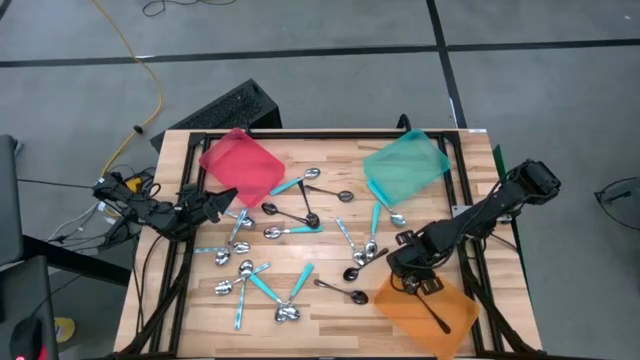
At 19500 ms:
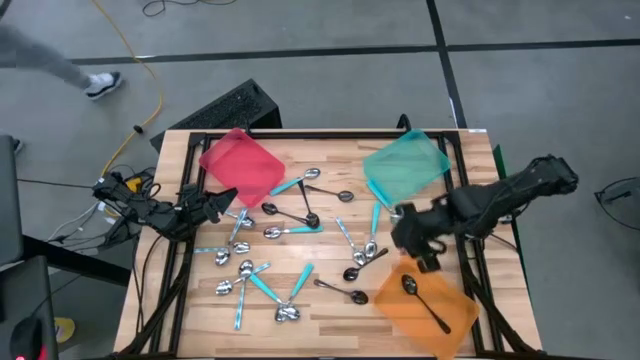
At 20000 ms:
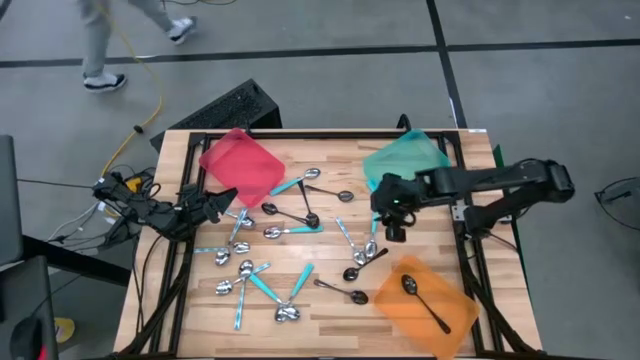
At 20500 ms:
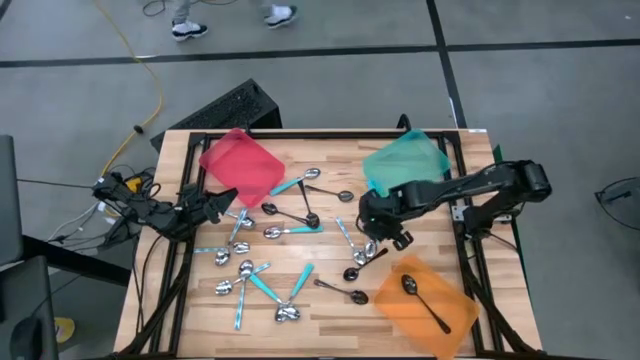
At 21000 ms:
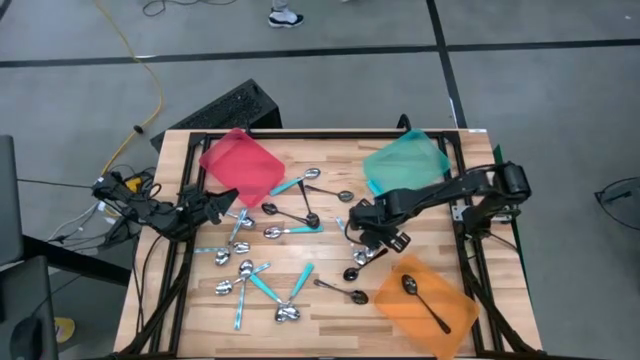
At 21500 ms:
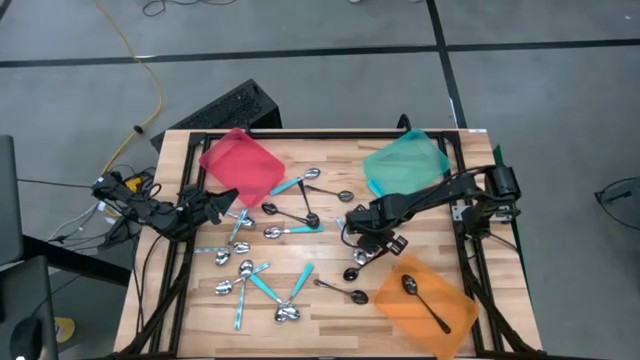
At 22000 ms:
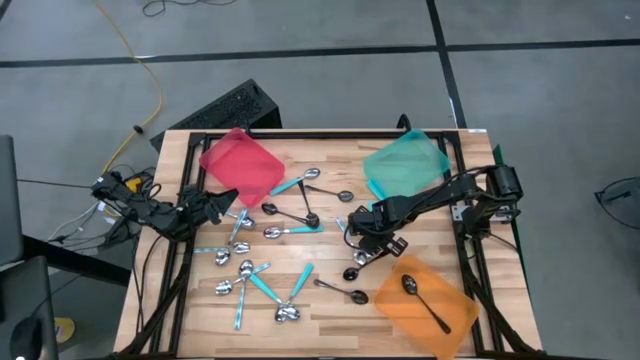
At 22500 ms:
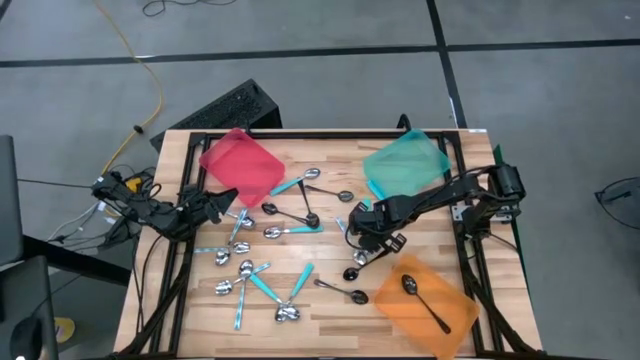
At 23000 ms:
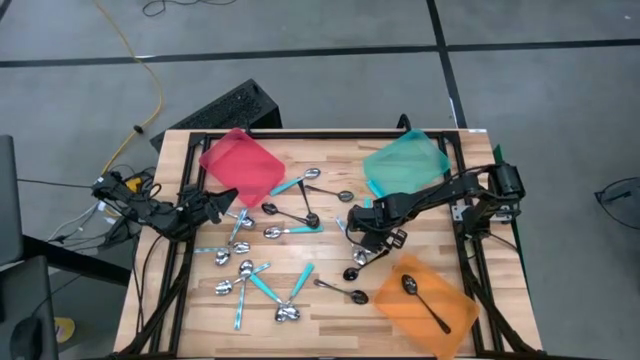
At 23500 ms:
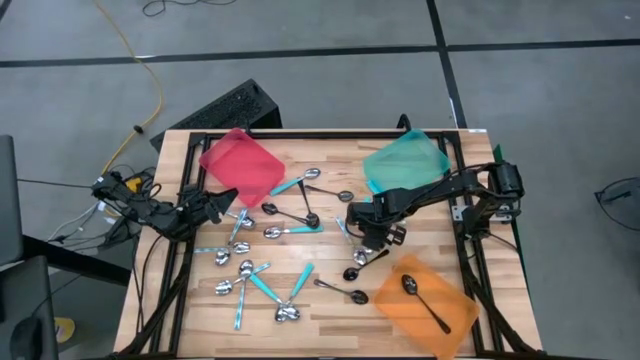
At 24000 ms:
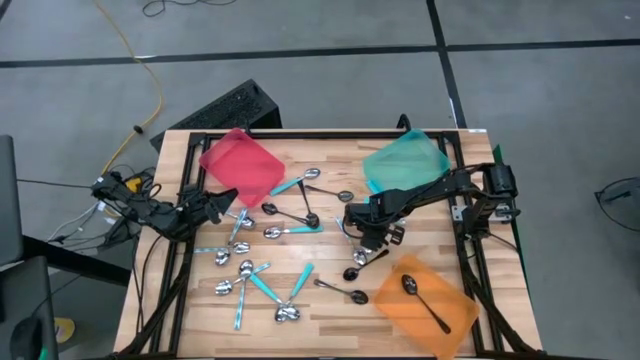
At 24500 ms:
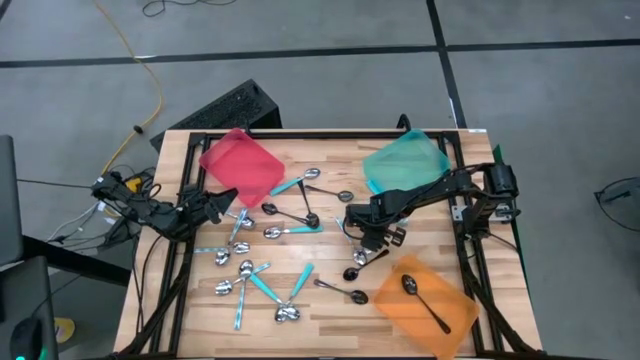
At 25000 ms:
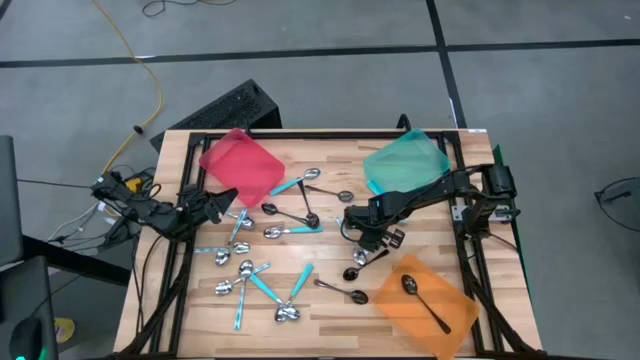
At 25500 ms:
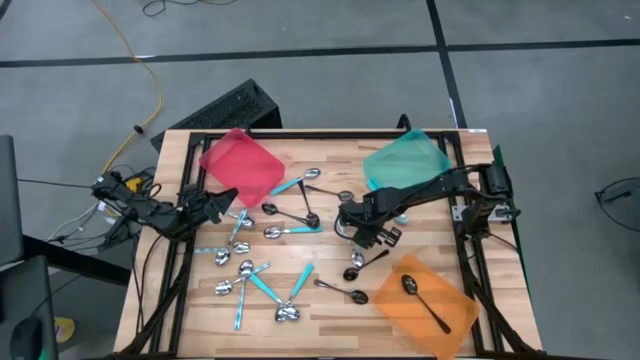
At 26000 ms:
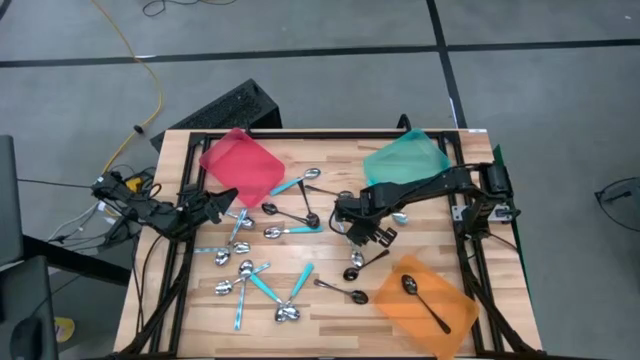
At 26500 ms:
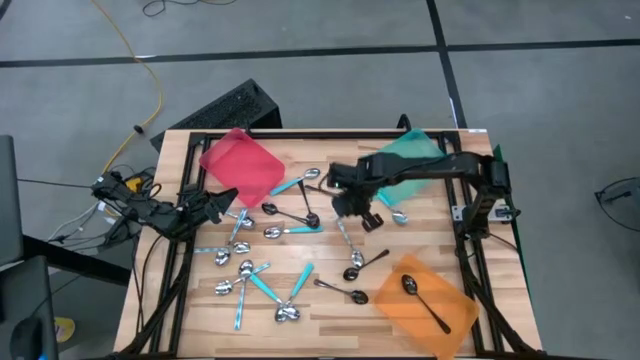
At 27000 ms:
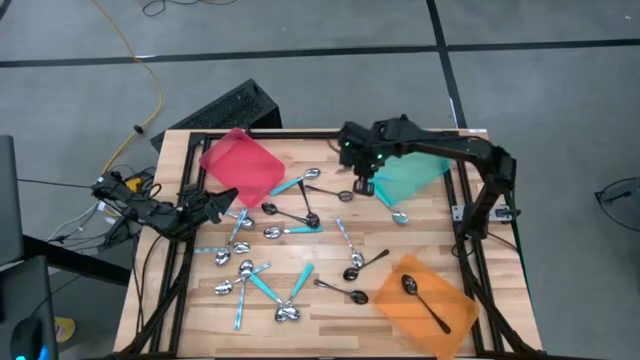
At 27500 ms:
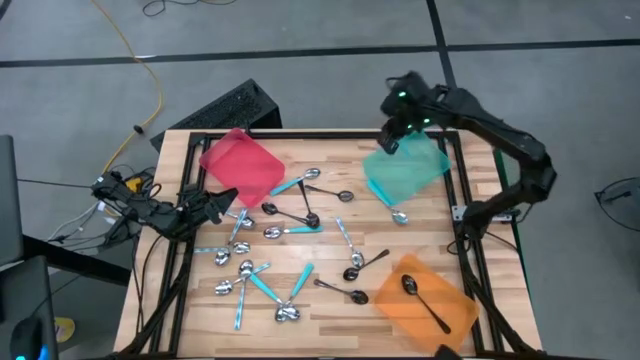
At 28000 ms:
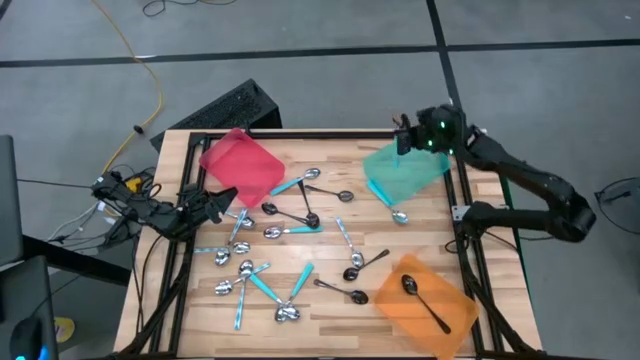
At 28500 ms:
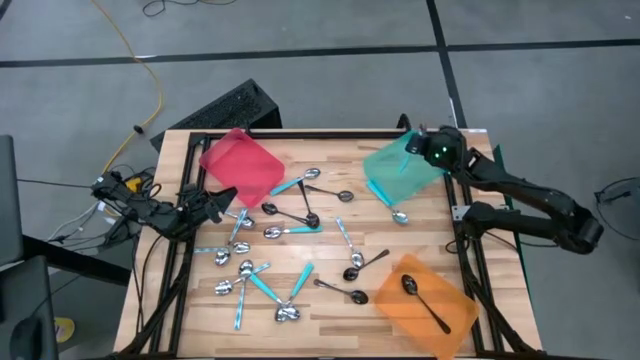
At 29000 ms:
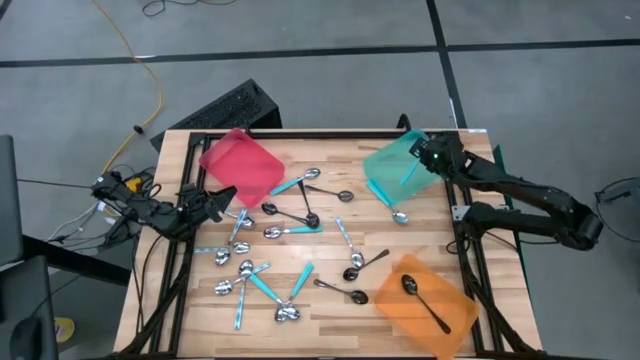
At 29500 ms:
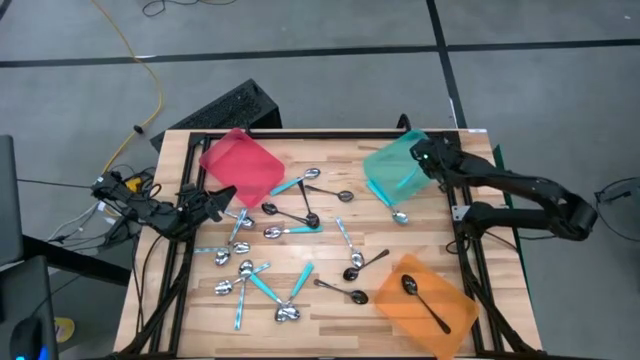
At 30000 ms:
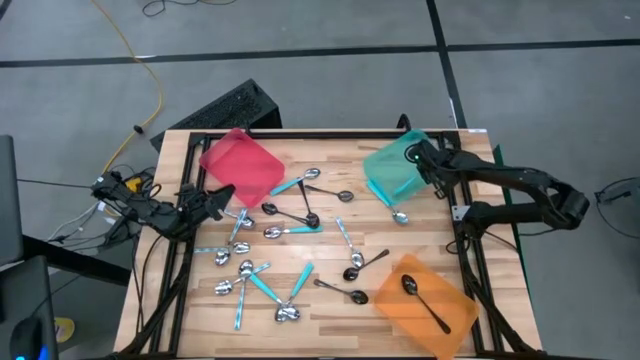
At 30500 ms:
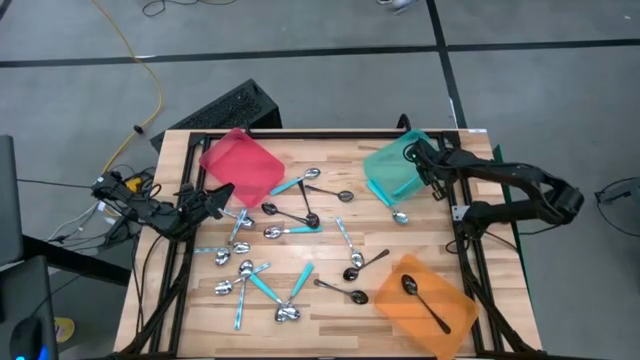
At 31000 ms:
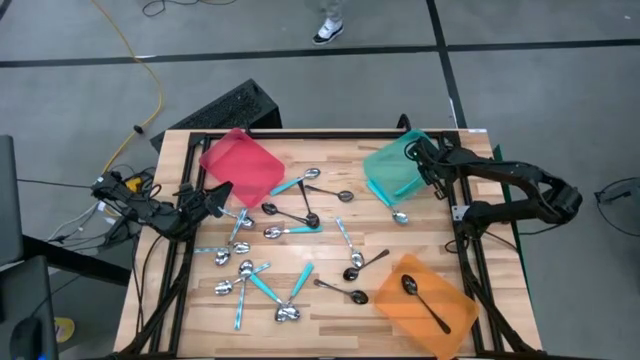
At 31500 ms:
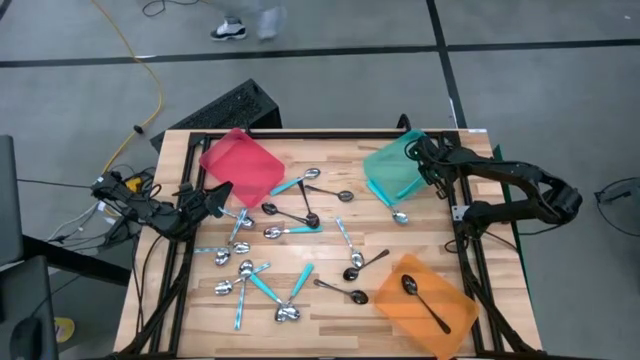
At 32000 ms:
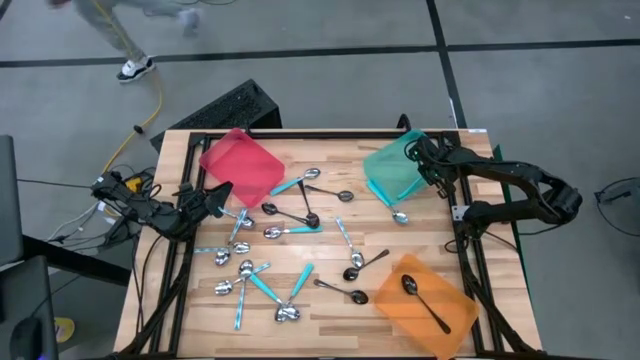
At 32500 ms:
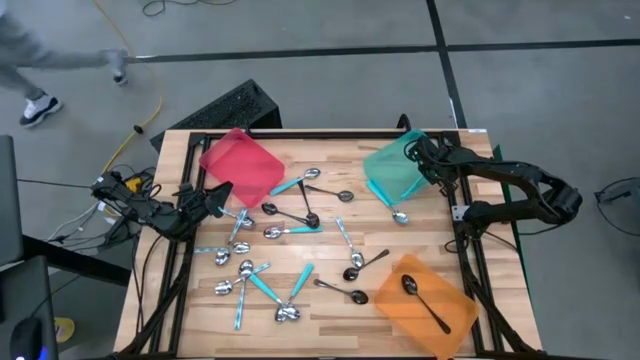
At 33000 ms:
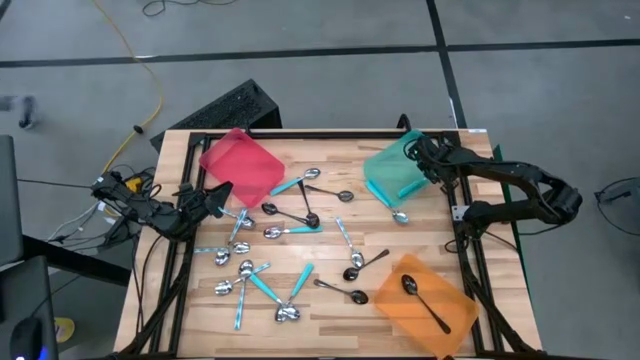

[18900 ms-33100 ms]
Task: Sort silverware by color (type)
Put the blue spoon into the blue bin

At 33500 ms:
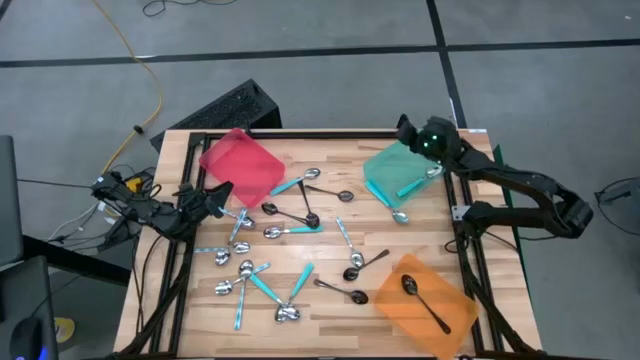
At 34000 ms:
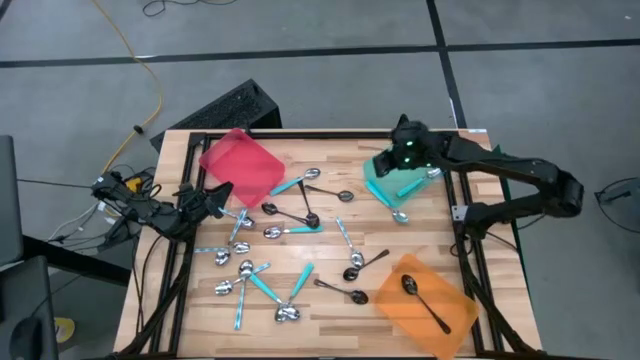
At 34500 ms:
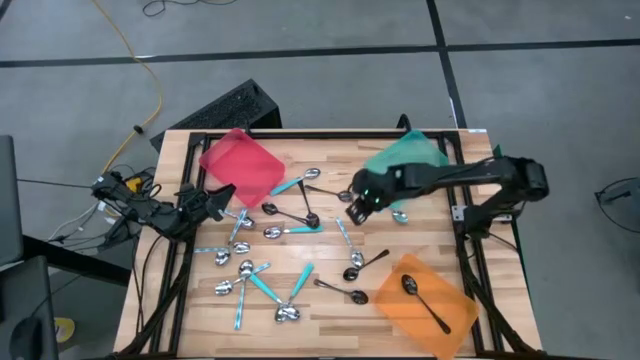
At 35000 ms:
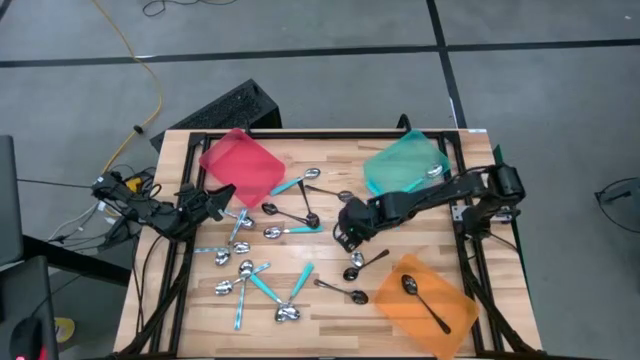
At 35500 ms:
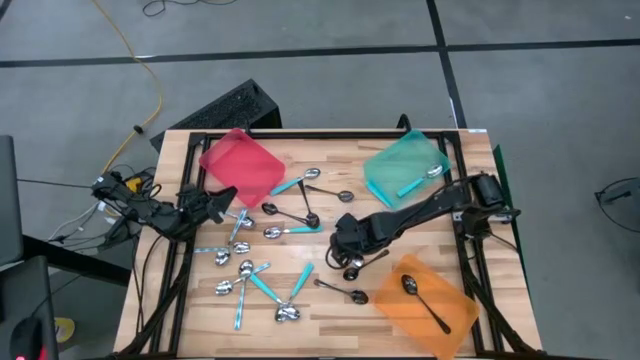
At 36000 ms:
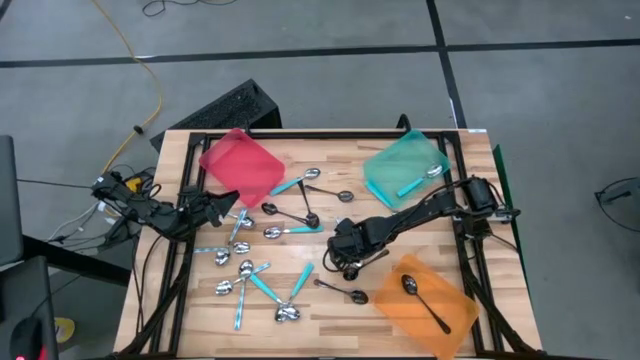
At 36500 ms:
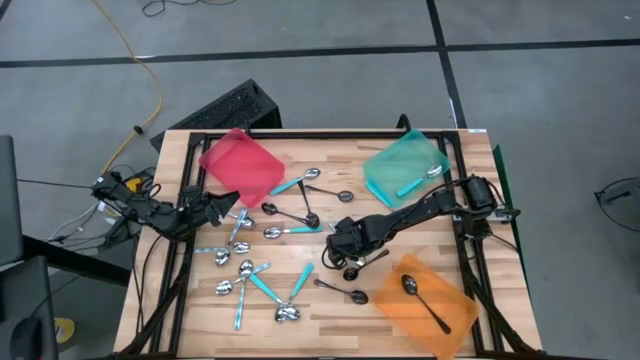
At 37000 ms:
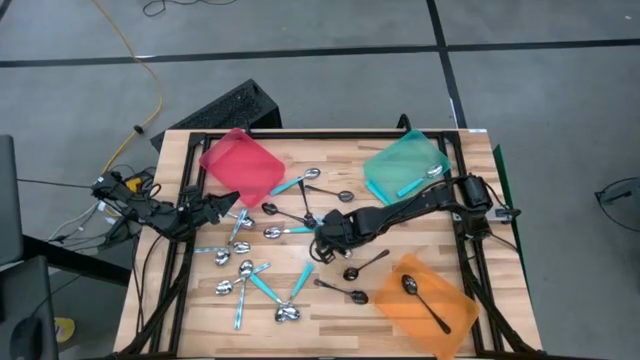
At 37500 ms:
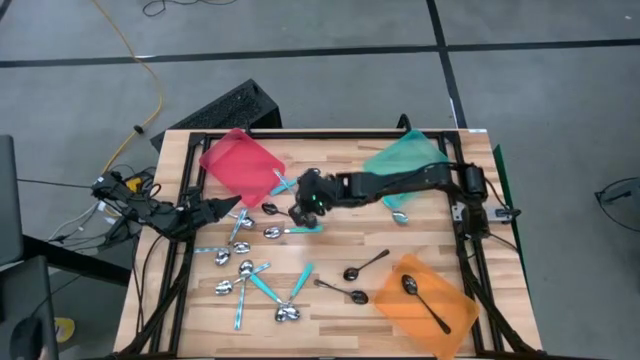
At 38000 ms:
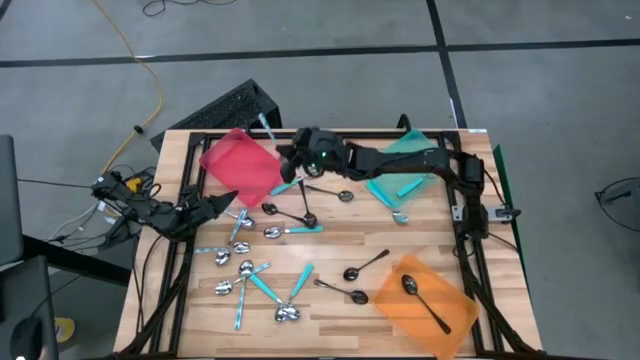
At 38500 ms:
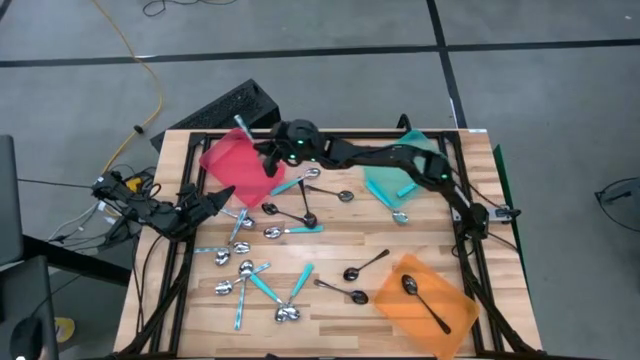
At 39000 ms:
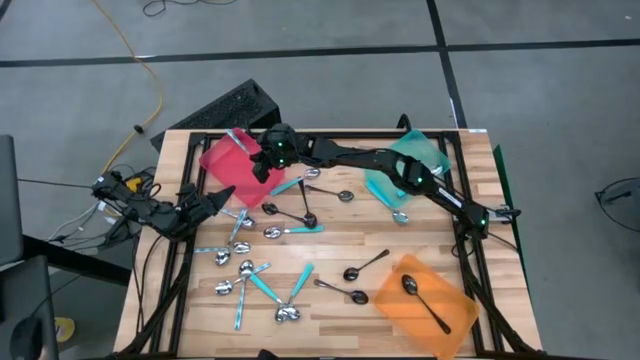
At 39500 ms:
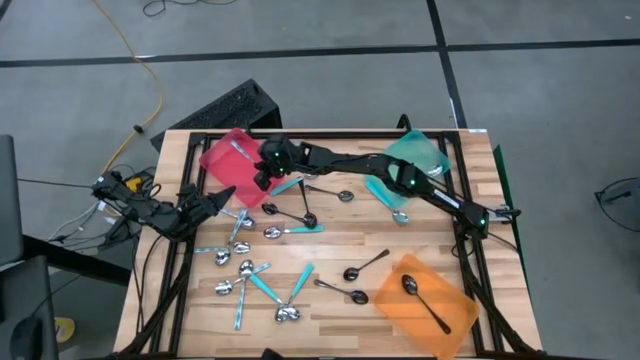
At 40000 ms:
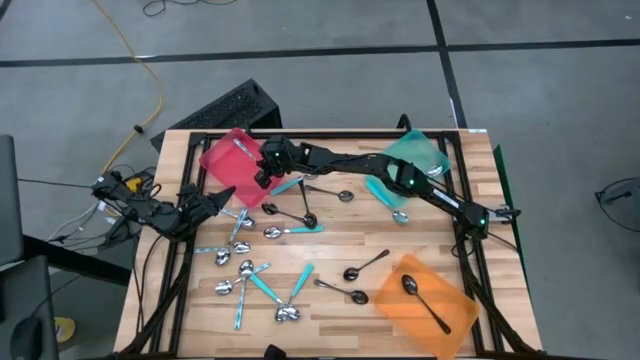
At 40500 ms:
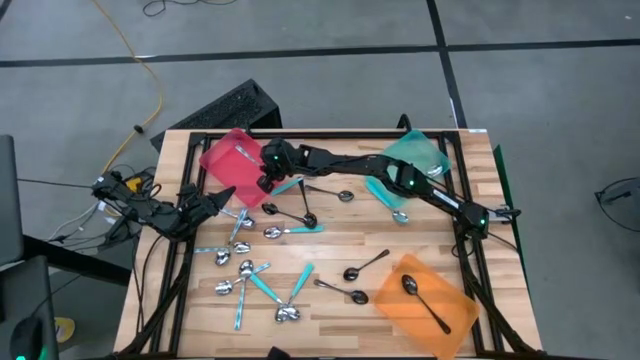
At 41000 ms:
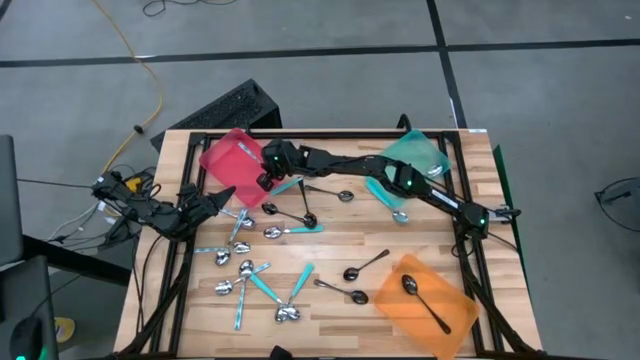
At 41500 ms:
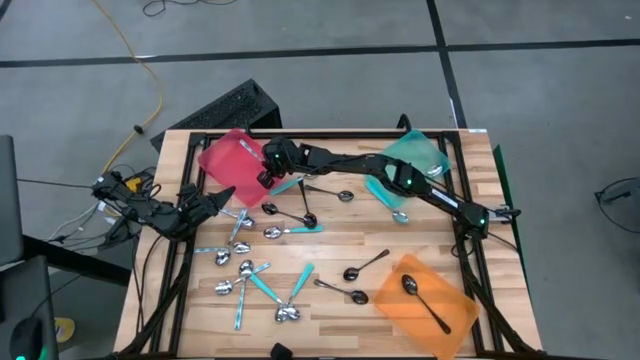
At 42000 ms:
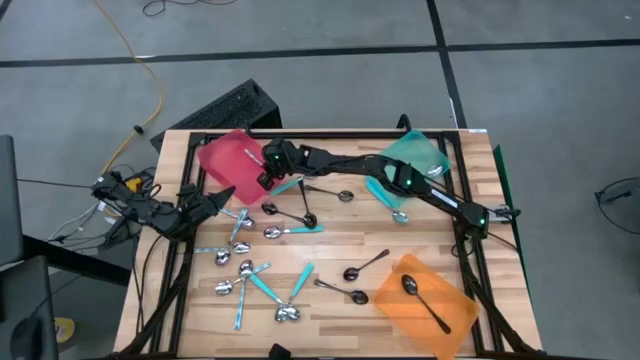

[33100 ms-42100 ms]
Put the blue patterned spoon into the red bin
